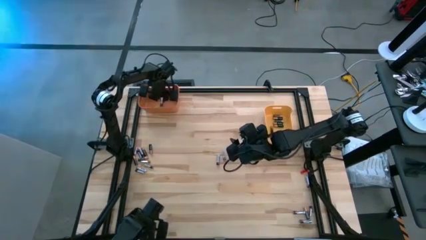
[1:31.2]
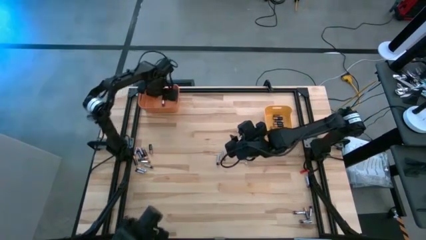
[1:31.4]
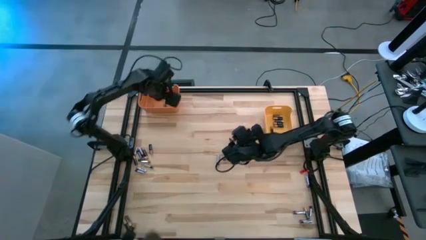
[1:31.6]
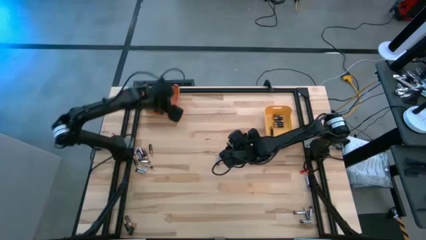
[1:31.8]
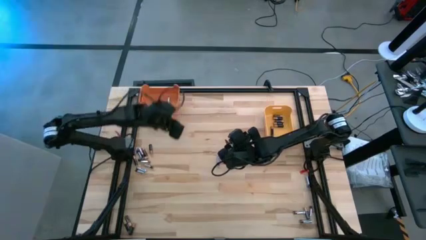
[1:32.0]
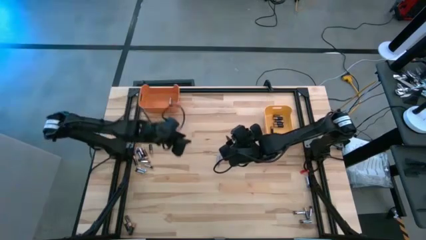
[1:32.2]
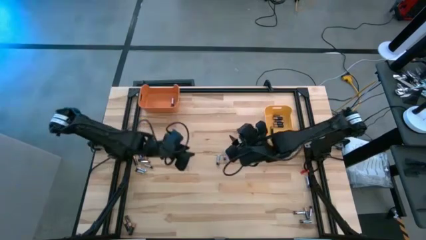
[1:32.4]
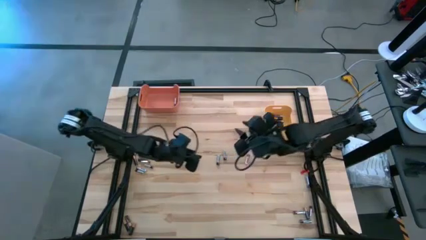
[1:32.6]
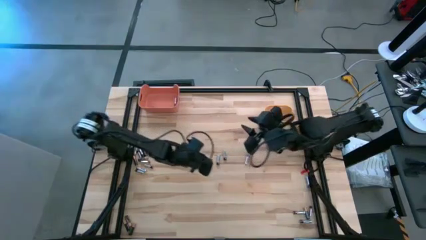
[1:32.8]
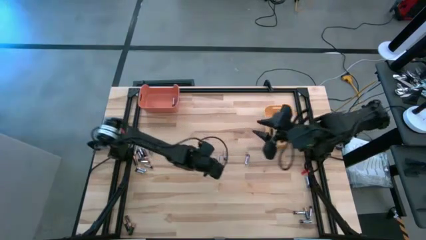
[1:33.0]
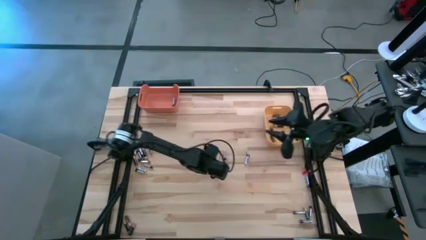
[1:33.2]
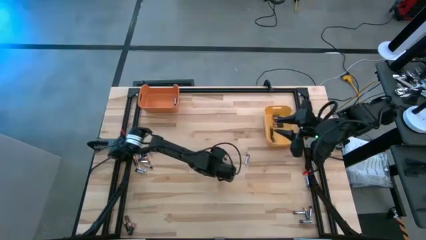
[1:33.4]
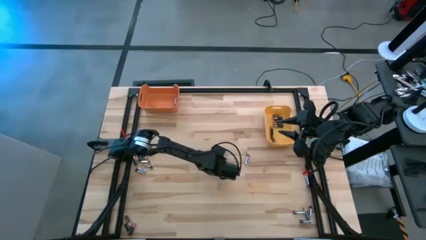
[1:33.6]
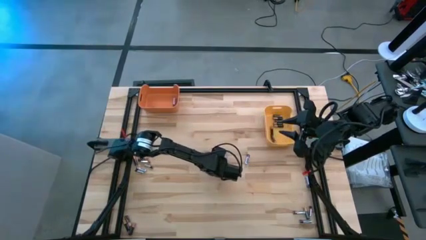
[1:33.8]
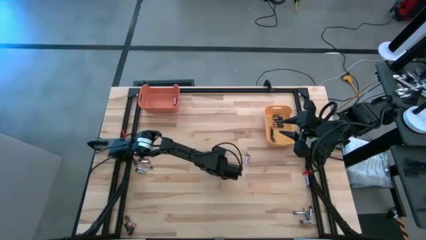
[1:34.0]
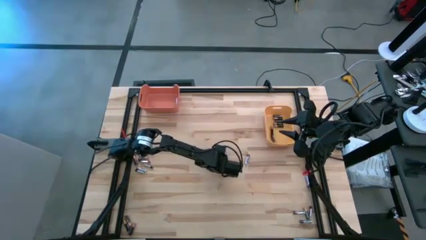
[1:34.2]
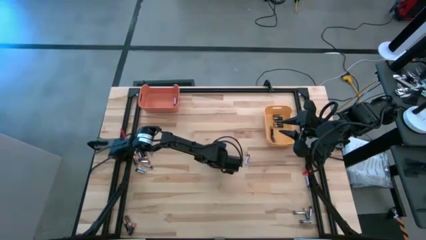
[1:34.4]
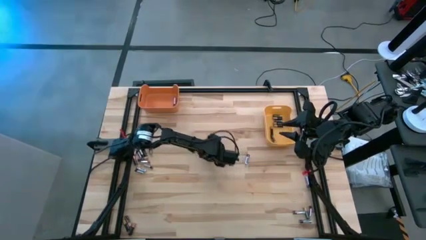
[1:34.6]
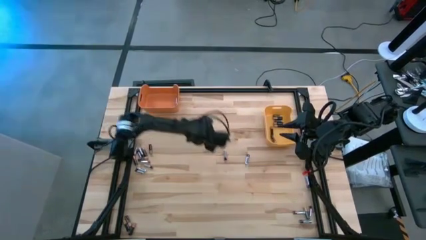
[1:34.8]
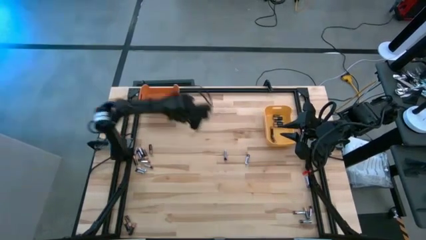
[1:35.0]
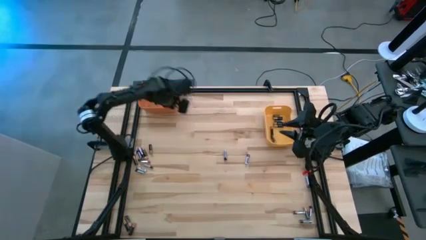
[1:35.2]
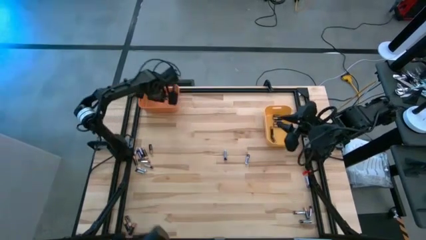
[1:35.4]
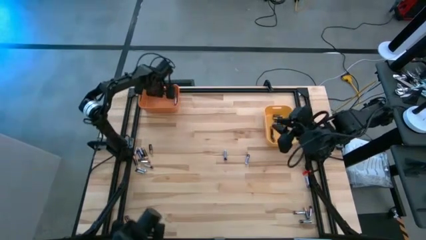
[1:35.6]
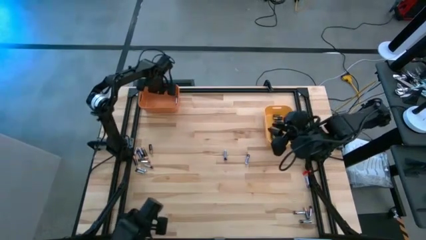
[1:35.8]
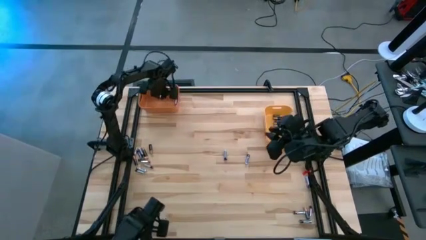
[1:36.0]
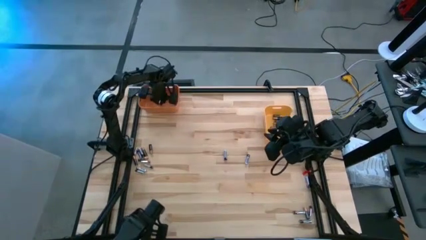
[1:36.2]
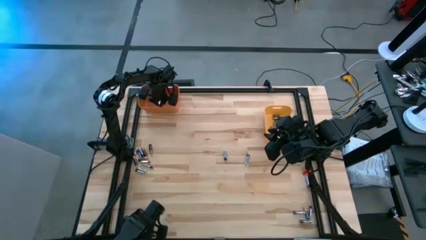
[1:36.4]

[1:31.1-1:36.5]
Task: Sort batteries
Put the silver battery into the orange bin

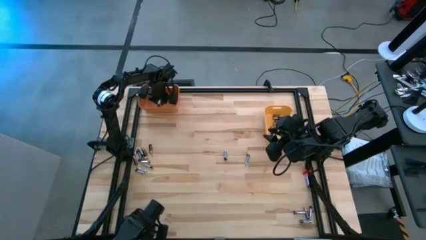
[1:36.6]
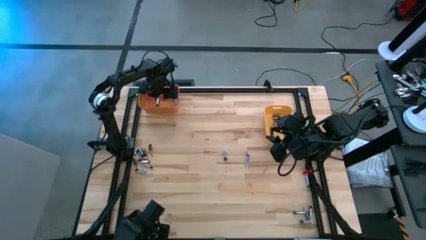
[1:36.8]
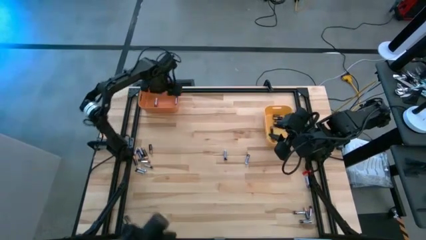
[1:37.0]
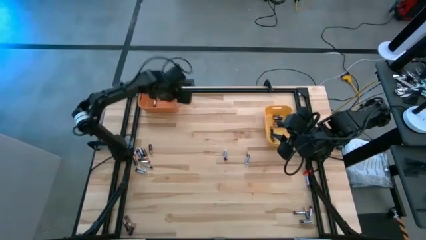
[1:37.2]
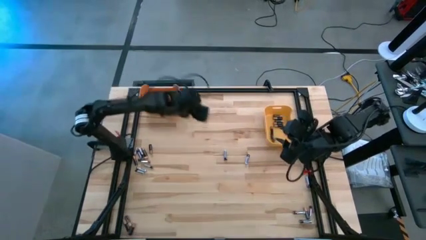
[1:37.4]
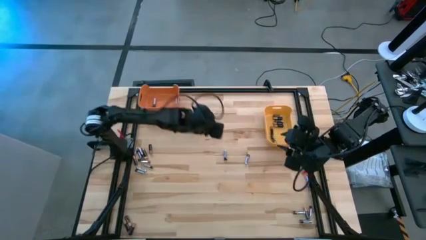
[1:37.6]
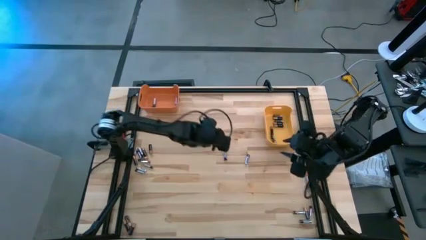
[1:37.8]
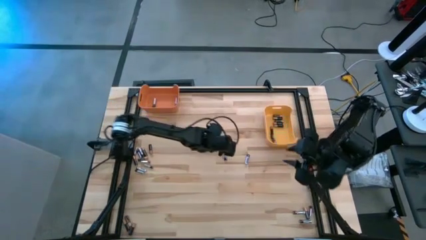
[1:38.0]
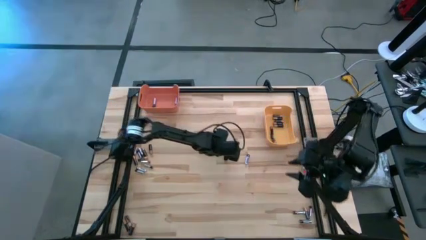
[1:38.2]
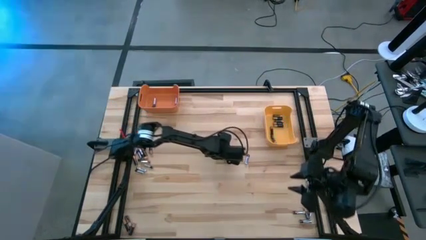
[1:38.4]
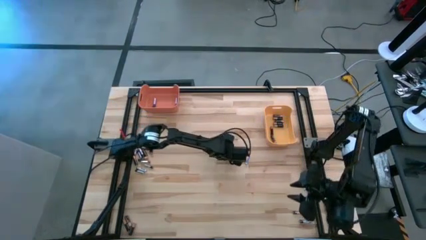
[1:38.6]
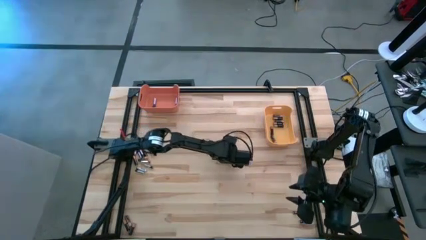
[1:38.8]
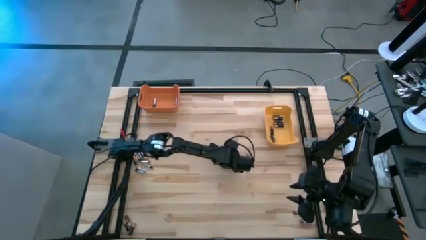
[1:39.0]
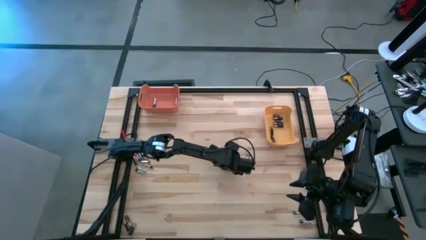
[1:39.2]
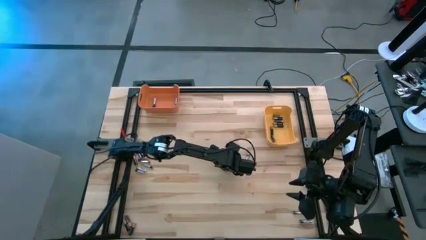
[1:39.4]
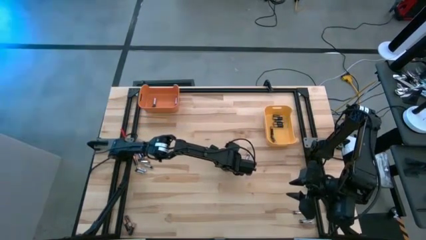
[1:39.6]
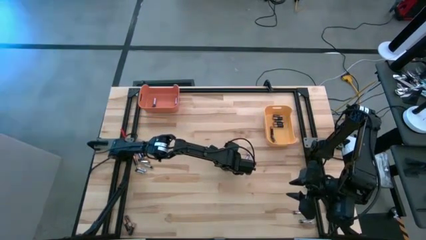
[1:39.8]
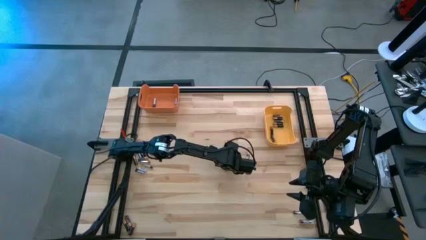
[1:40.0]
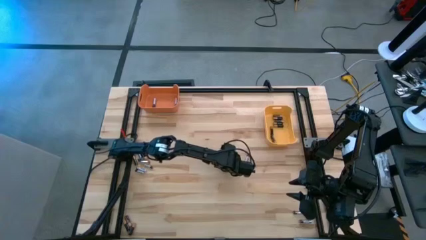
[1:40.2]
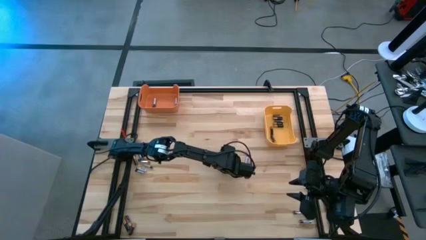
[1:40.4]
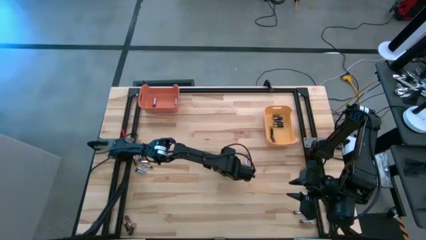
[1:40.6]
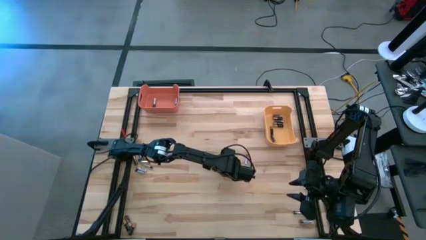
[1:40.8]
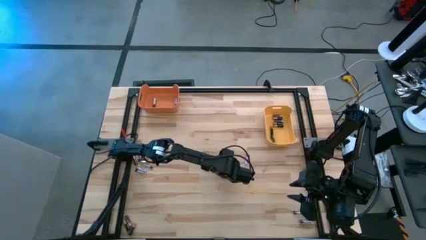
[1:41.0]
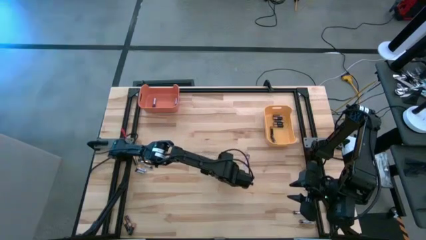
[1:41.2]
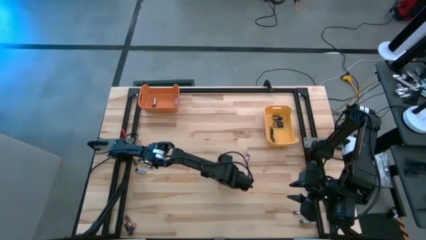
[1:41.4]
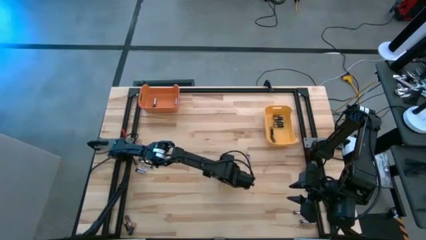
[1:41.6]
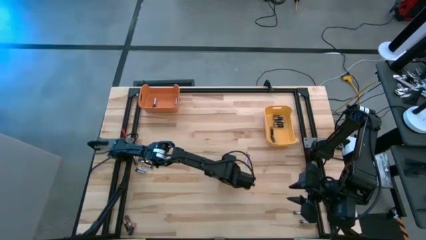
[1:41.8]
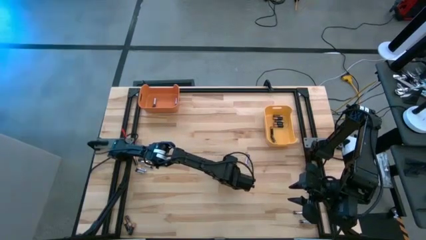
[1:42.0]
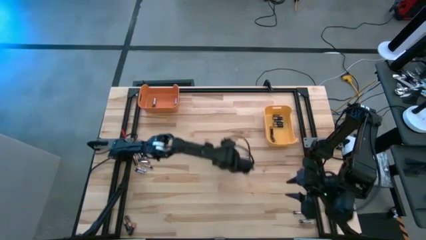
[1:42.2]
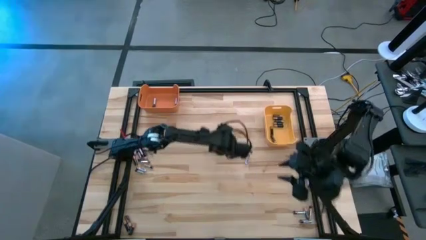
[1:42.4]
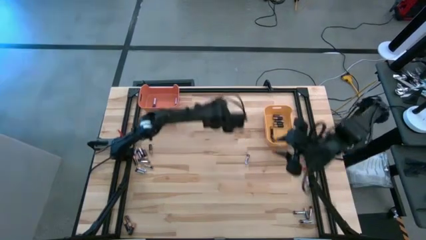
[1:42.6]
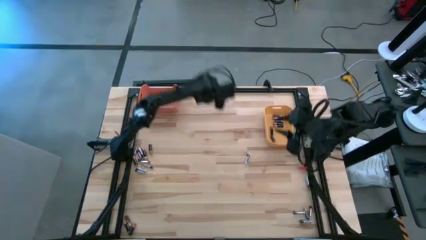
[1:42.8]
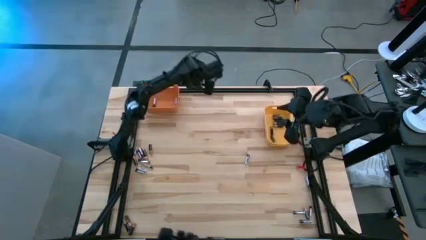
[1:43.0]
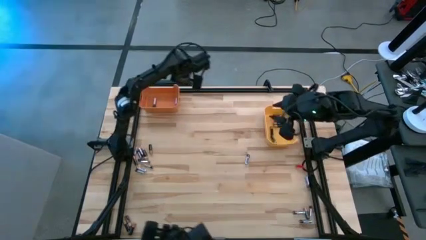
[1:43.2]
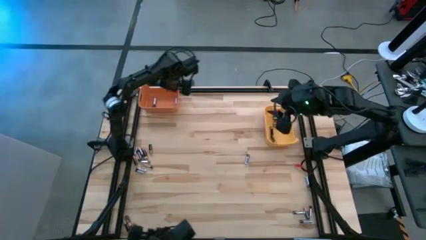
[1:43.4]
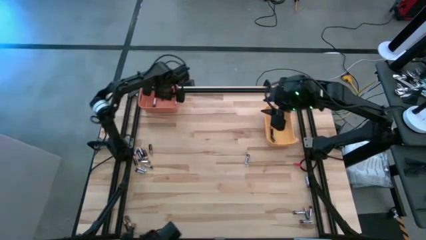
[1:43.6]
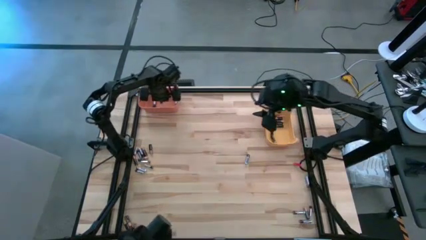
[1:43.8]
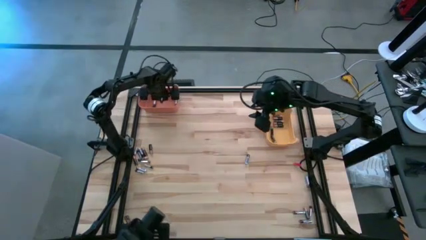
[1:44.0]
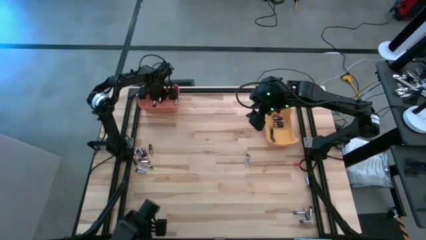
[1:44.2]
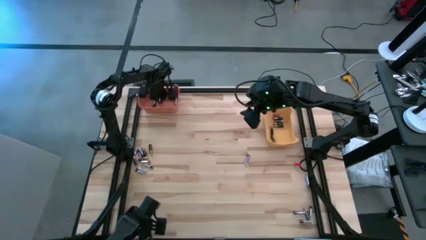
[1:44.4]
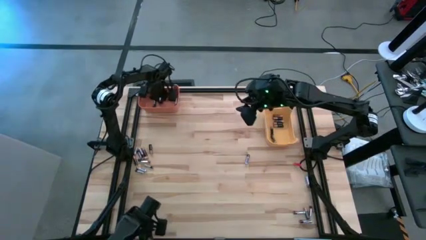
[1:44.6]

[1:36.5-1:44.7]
Put the silver battery into the orange bin

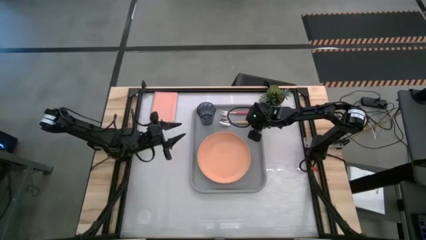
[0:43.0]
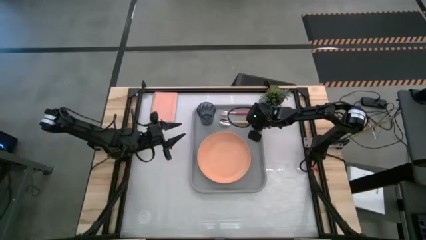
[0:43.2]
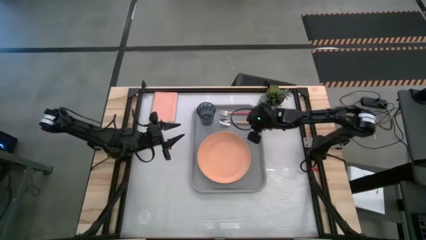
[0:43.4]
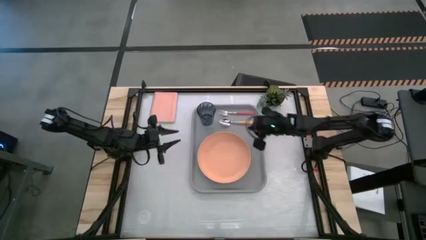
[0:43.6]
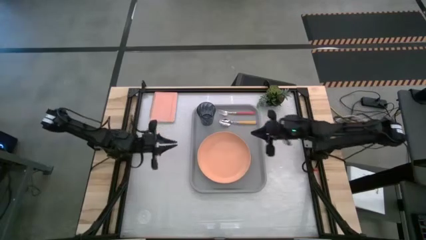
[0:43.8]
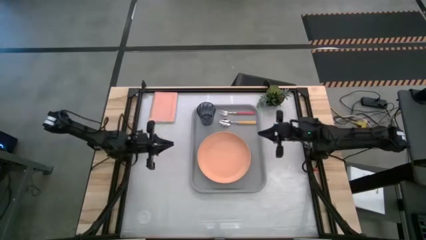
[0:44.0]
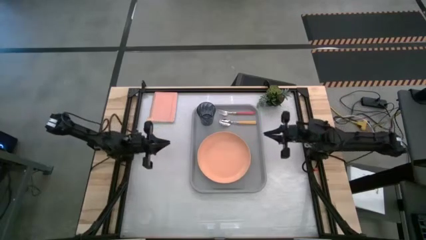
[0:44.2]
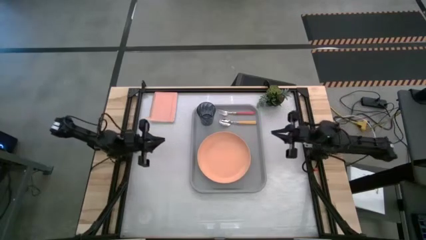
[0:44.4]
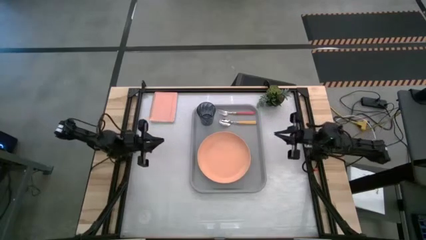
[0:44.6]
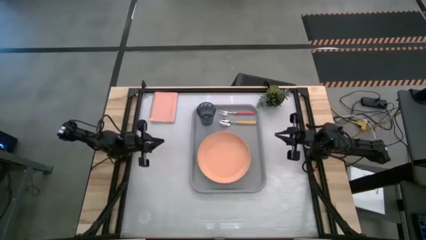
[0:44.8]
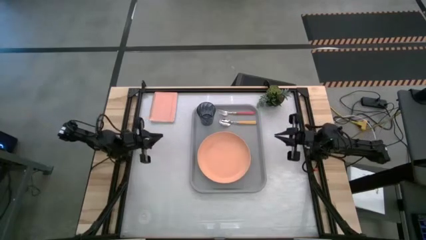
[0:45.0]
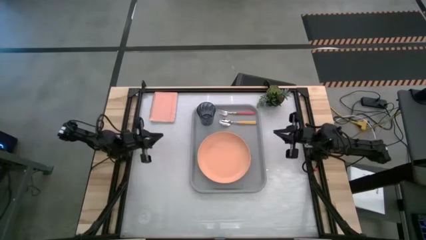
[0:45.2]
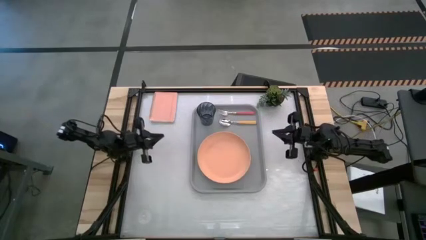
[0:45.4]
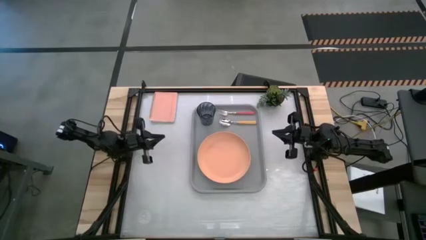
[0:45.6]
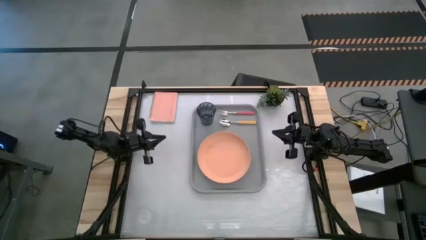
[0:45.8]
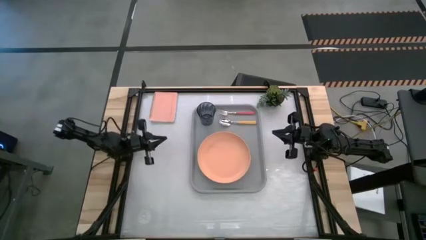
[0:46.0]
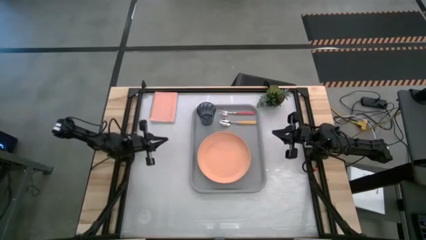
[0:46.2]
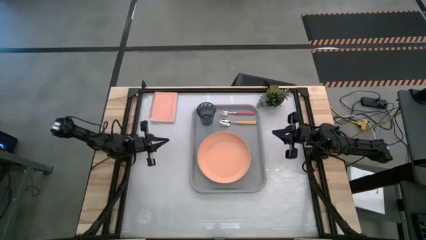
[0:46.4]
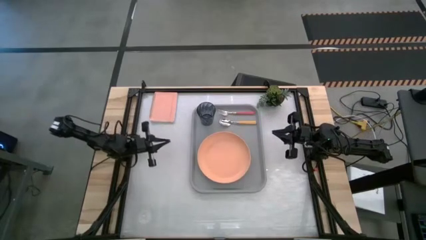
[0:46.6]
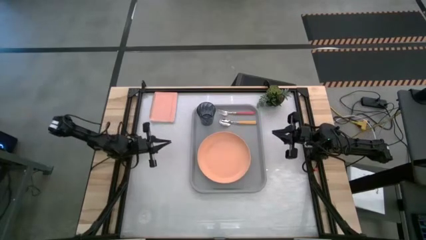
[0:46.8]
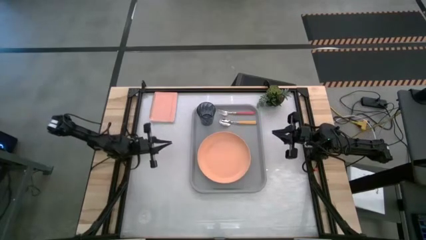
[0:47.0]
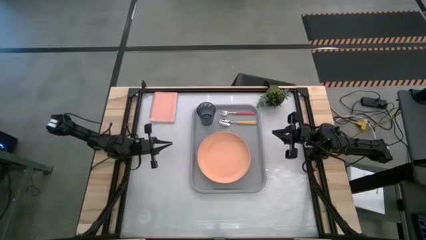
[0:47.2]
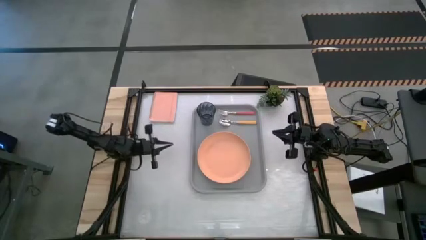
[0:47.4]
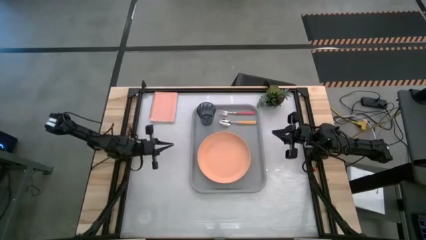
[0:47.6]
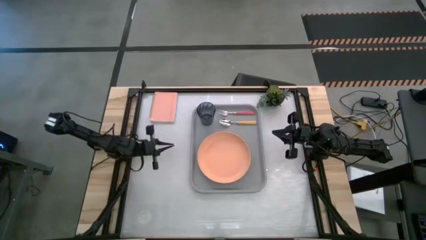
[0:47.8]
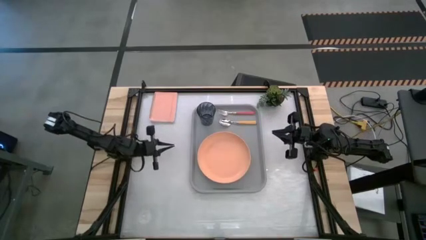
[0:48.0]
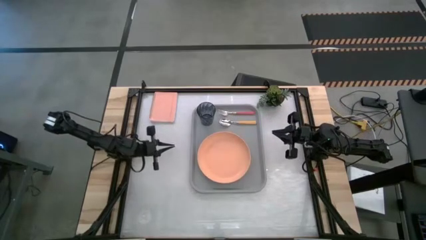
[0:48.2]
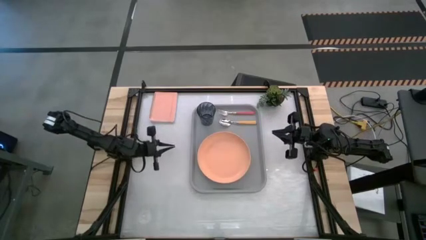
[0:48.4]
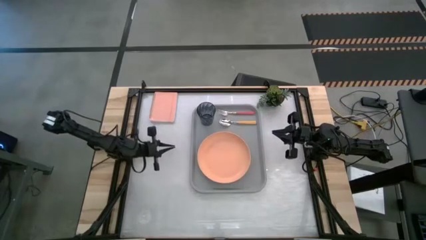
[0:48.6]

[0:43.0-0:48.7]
Task: Pick and place plate/cup/fork/spoon on tray
Return to Home Position
